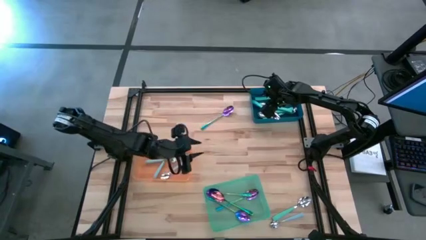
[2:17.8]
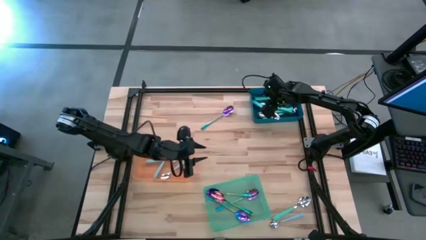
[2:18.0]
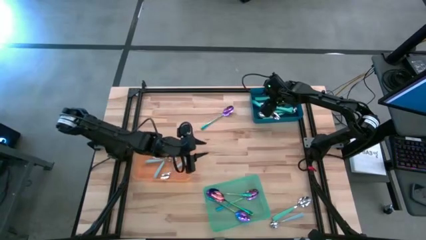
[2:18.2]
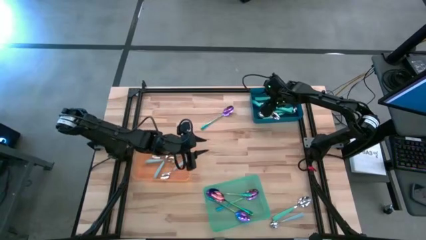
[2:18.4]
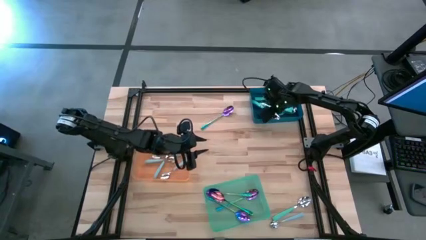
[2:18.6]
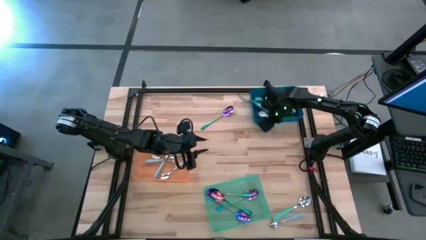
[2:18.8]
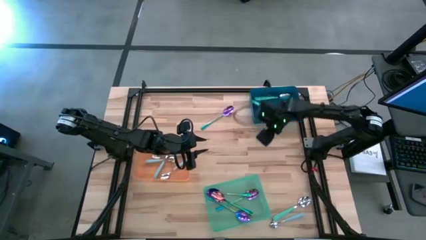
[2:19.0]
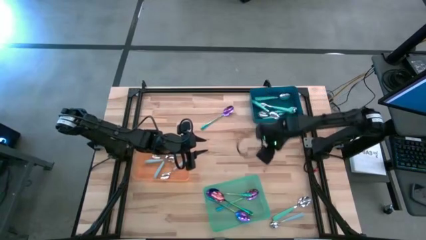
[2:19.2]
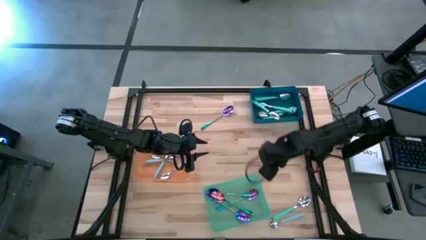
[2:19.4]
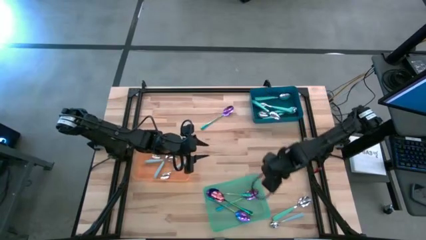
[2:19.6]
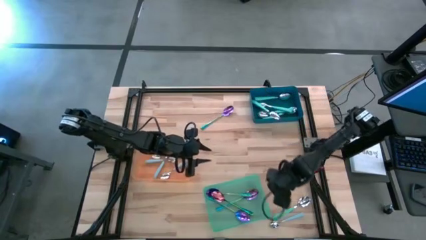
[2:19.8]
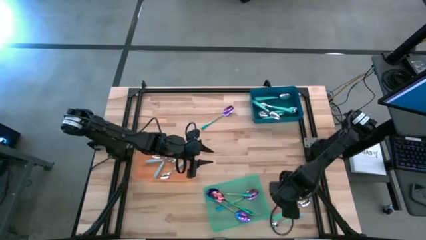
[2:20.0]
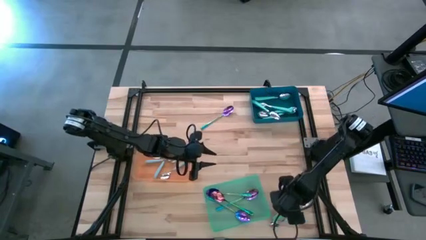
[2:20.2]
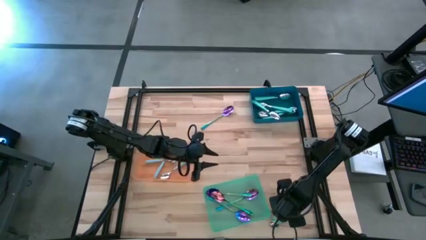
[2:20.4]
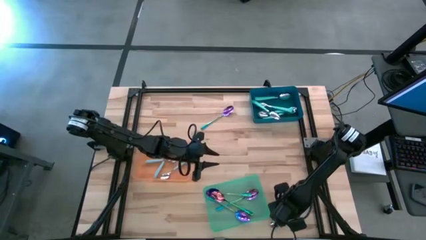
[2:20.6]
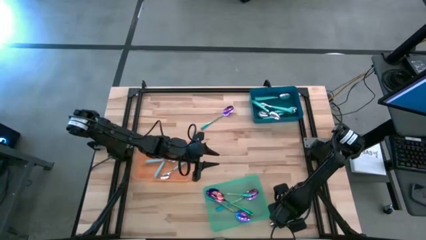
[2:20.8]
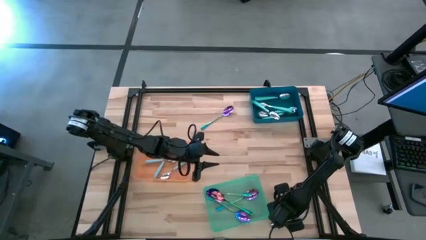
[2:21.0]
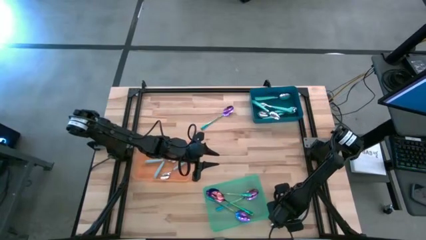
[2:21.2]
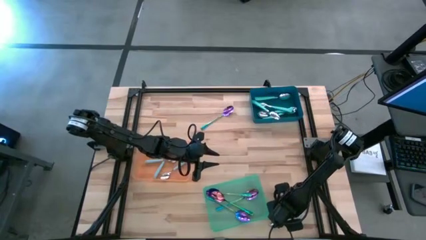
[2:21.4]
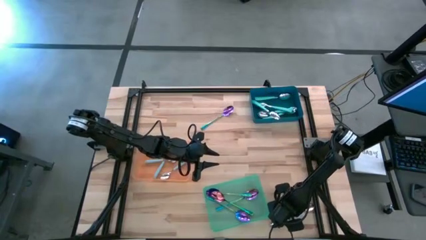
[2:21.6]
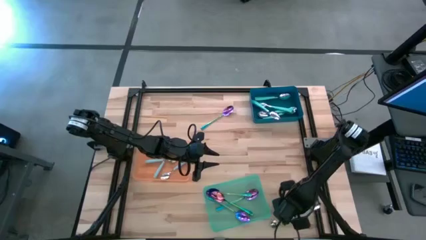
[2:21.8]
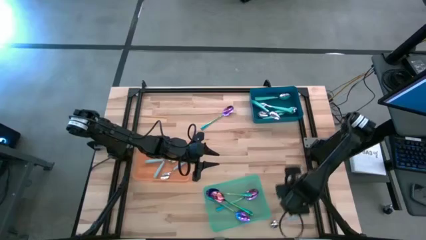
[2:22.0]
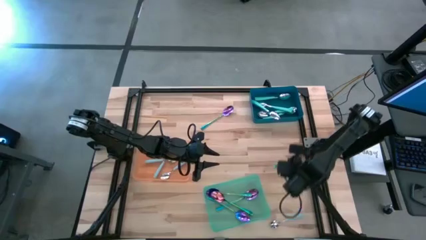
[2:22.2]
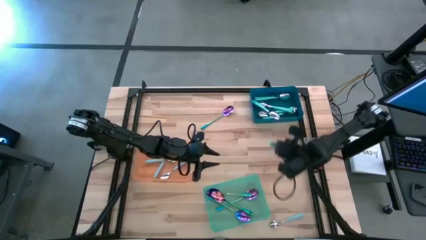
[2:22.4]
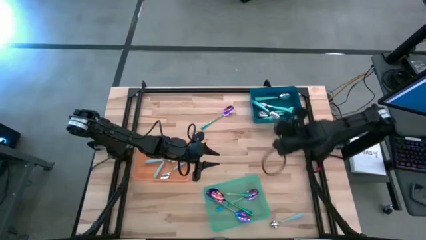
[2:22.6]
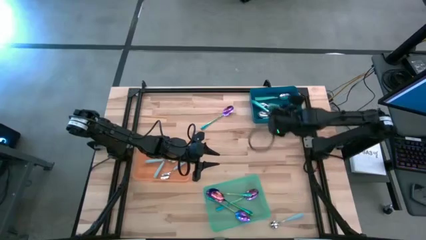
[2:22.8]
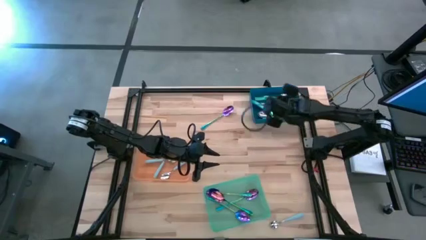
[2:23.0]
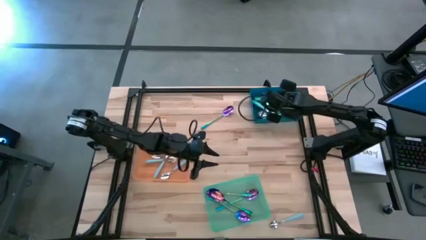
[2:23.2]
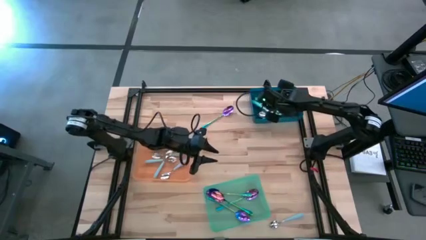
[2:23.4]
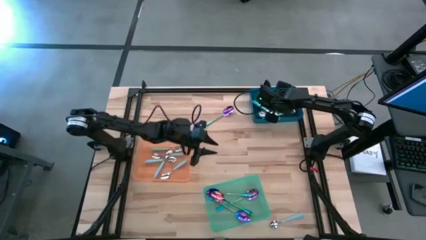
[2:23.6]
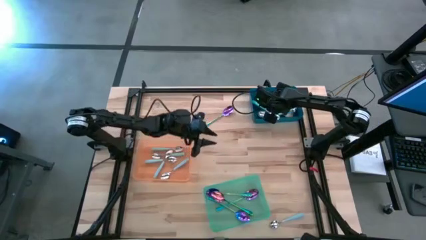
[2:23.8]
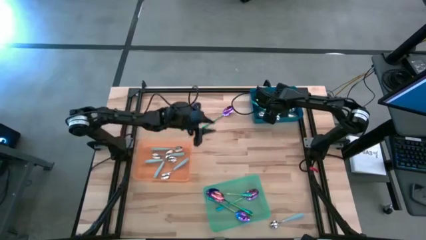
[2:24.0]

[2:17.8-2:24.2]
Task: Sort silverware by color (type)
Put the green spoon into the blue bin

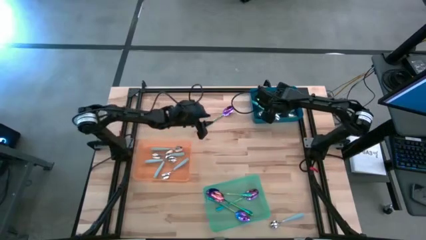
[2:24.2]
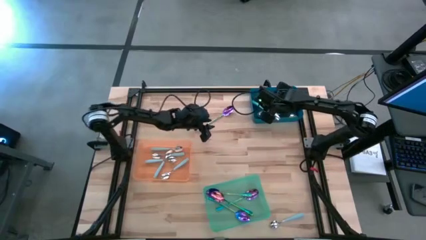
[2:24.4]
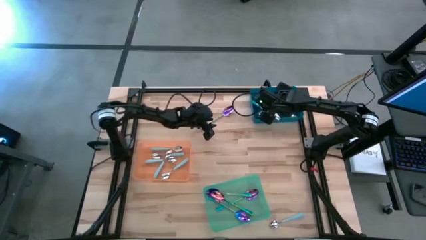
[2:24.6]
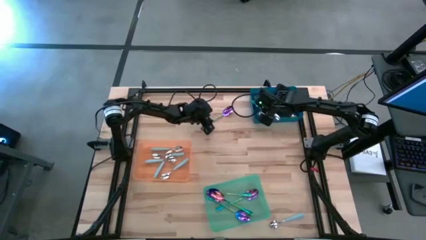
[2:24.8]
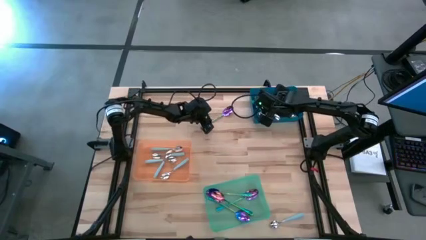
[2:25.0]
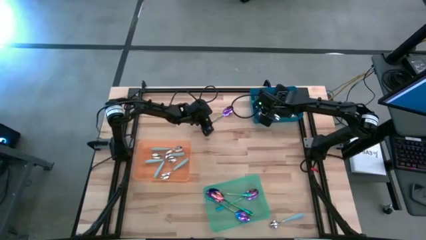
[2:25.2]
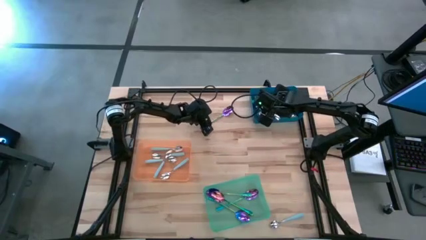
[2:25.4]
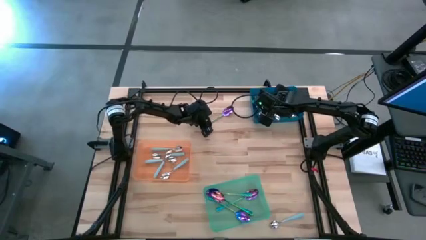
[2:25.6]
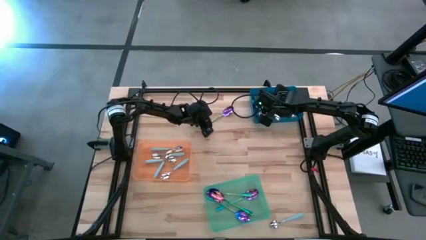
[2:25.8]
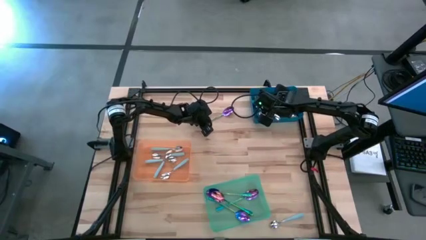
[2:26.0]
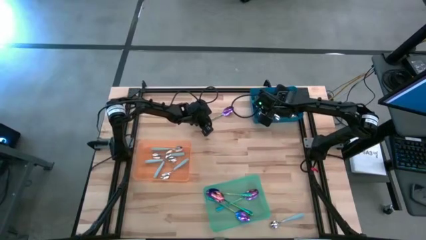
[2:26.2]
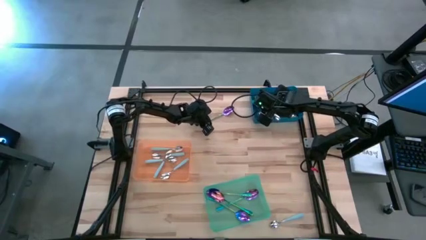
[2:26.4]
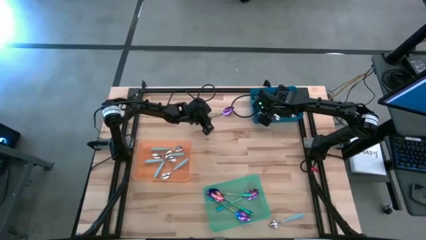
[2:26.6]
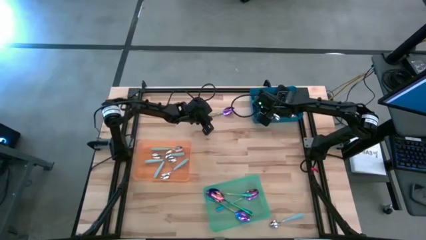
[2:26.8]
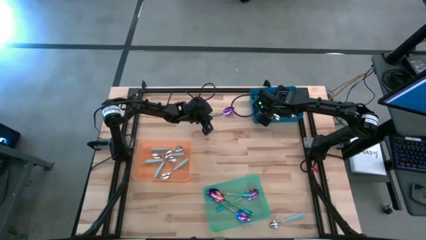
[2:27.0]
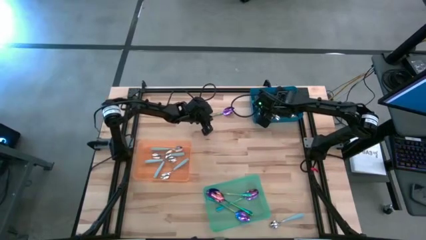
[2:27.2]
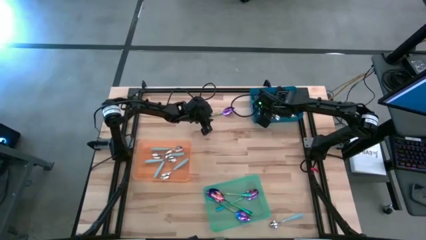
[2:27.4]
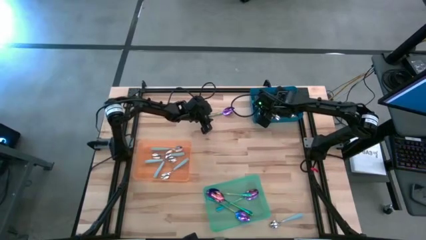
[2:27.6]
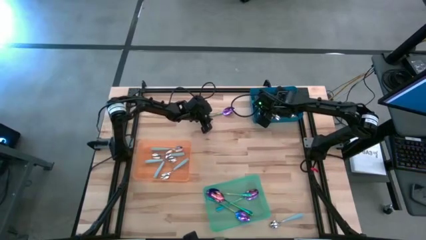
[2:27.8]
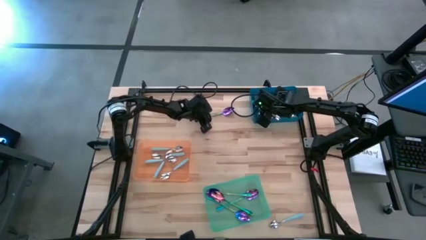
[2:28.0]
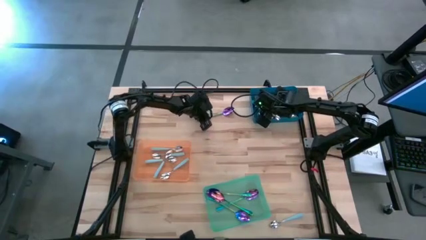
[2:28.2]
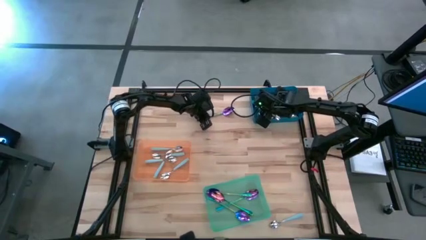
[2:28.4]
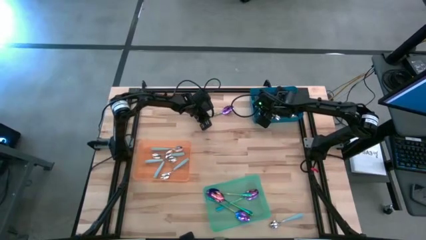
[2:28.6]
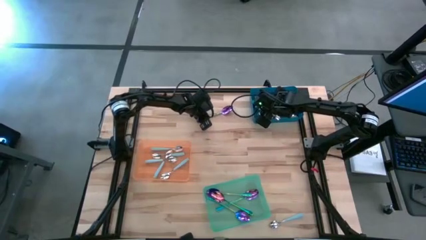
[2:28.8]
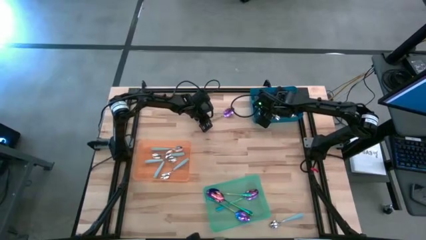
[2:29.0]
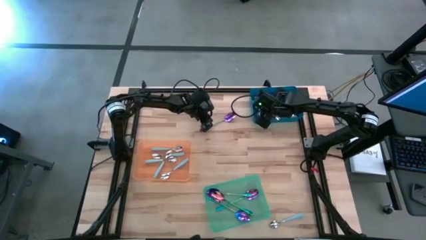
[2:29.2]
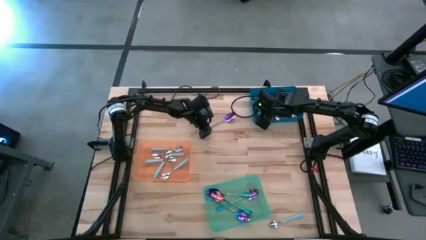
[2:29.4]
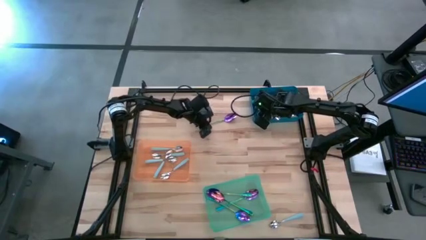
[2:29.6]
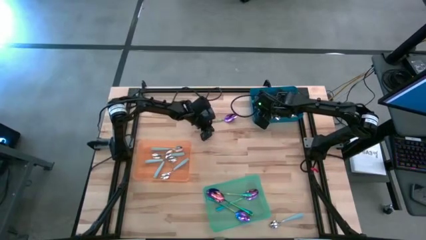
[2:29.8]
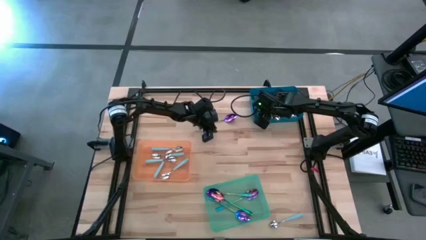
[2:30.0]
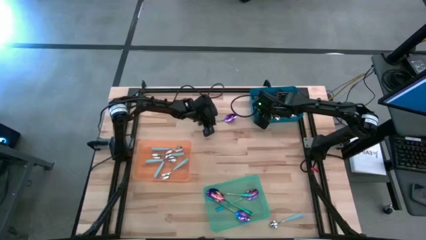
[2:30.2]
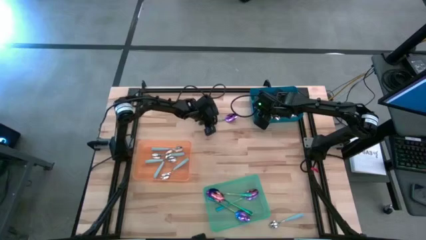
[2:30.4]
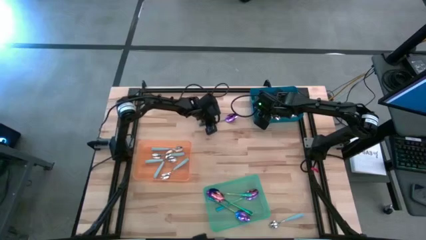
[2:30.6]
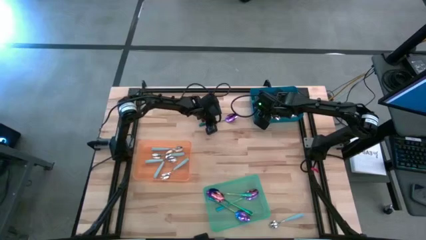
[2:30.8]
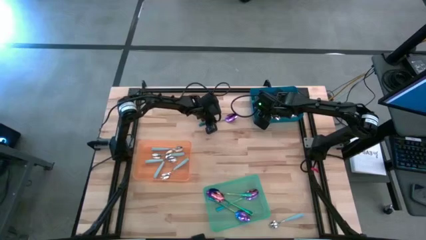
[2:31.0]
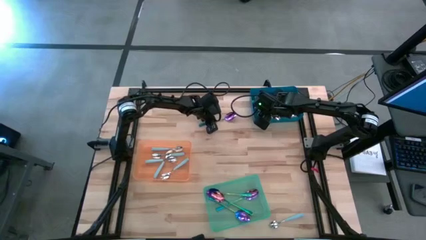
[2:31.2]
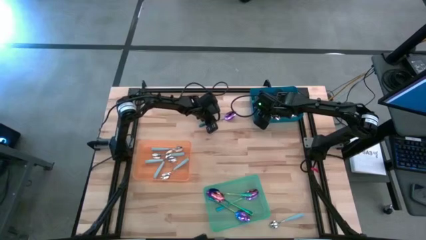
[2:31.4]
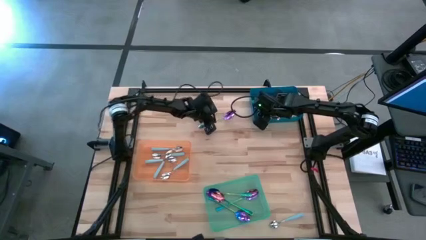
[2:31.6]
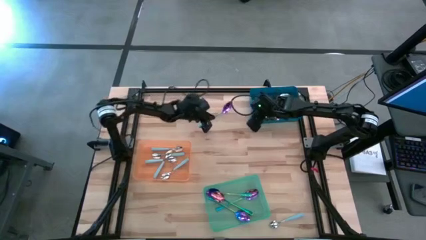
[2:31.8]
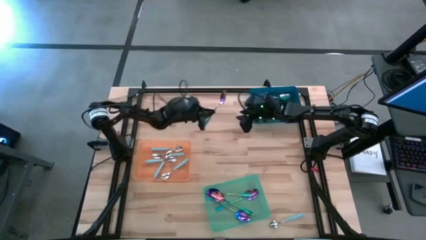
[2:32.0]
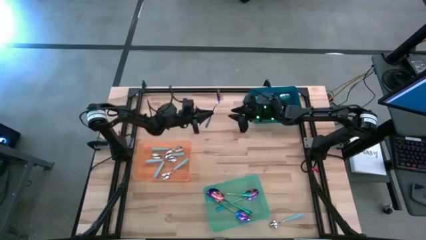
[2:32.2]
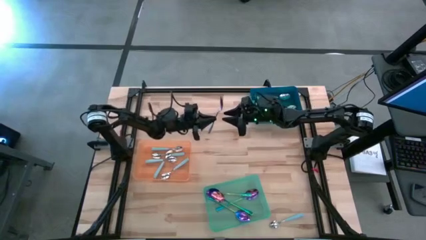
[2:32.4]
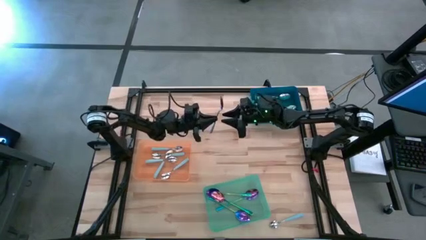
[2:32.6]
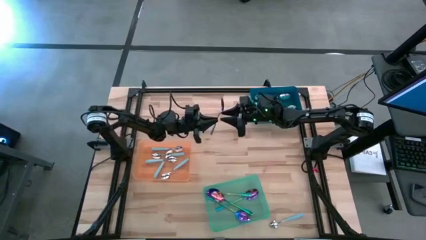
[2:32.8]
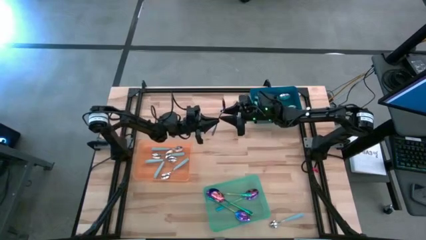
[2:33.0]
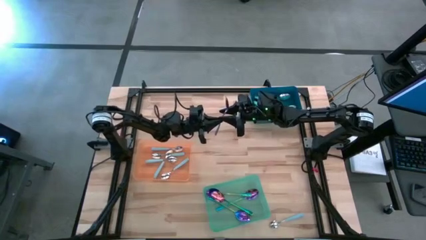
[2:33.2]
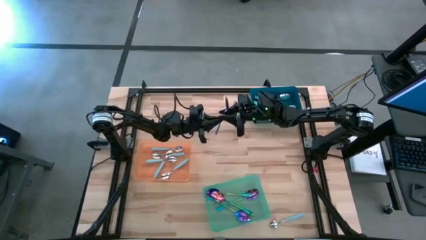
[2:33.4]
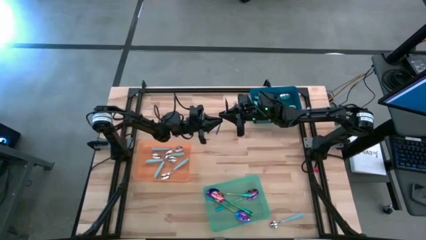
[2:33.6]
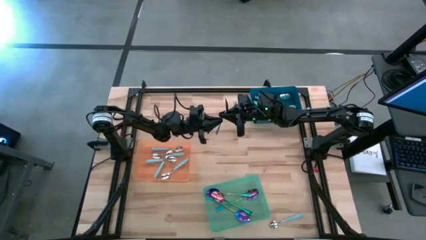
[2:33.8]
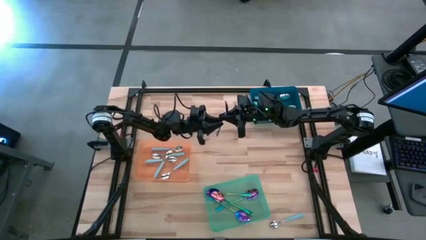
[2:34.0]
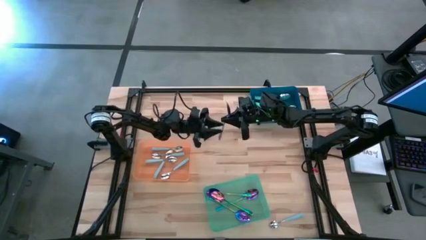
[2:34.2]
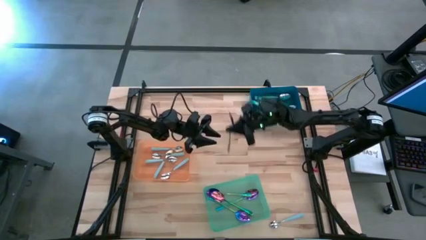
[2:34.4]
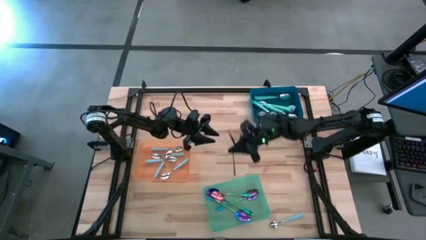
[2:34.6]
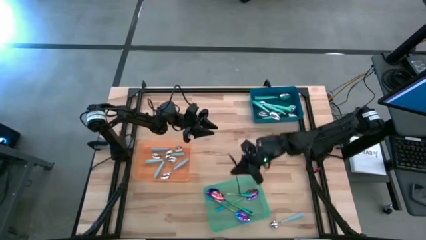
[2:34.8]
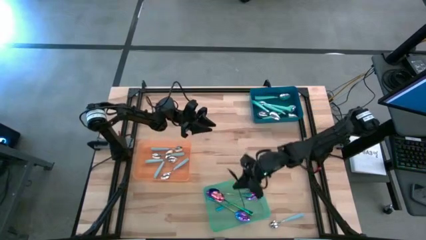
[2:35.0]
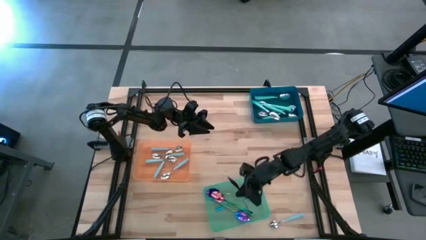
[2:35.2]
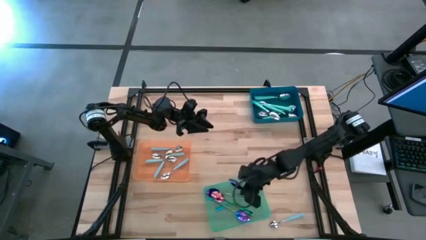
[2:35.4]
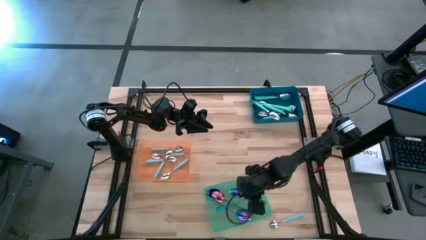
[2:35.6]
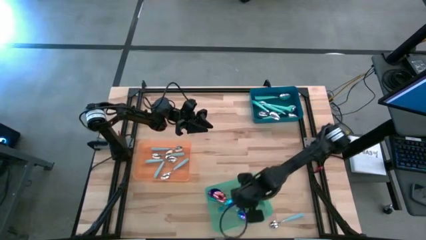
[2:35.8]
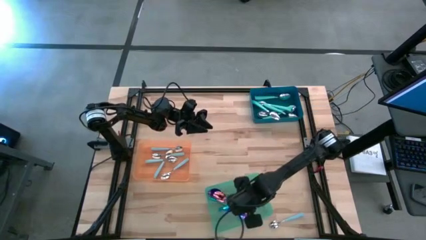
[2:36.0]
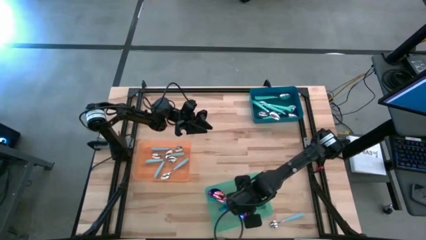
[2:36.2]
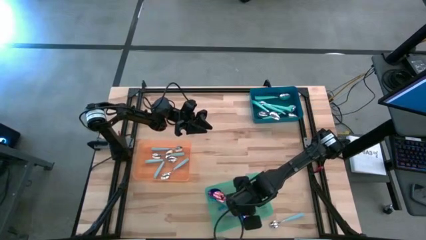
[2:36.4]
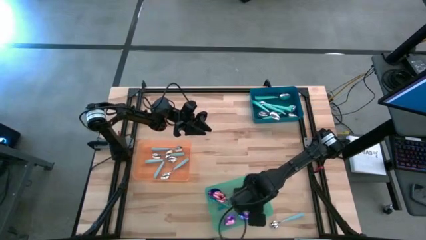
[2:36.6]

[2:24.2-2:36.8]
Put the purple spoon into the green bin
